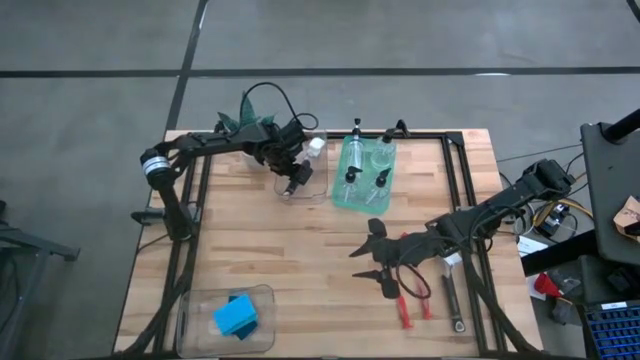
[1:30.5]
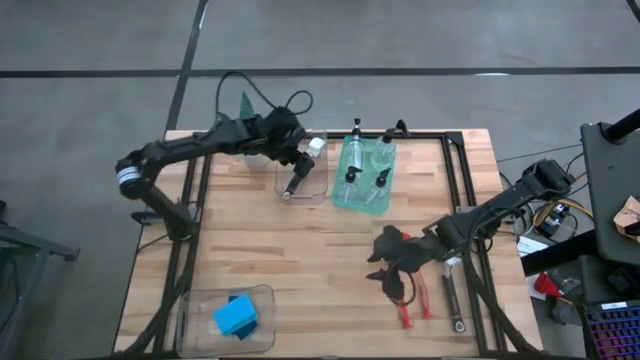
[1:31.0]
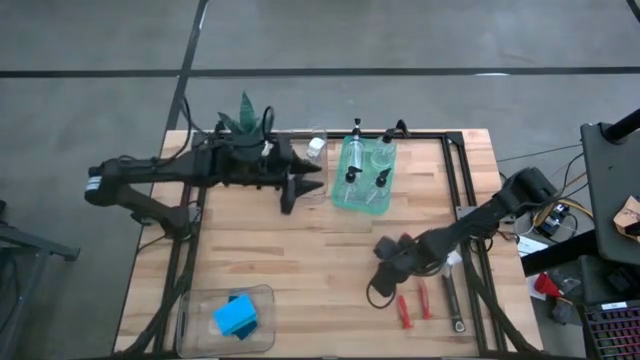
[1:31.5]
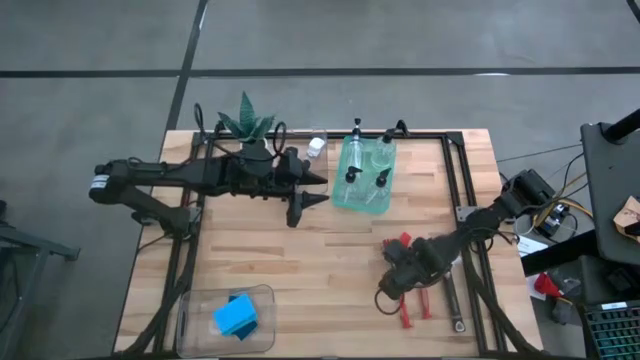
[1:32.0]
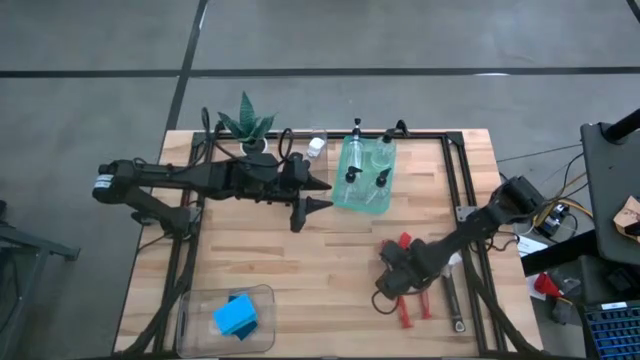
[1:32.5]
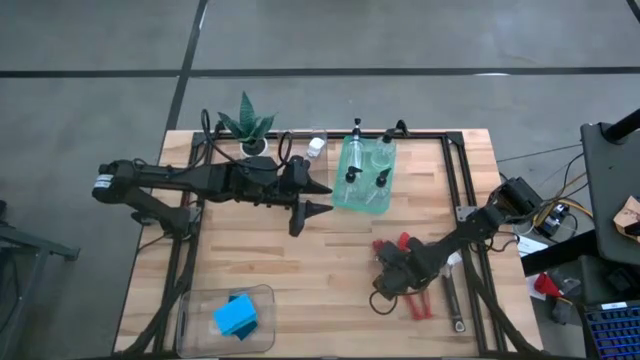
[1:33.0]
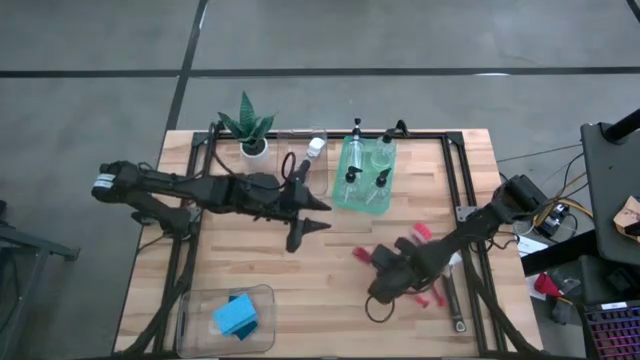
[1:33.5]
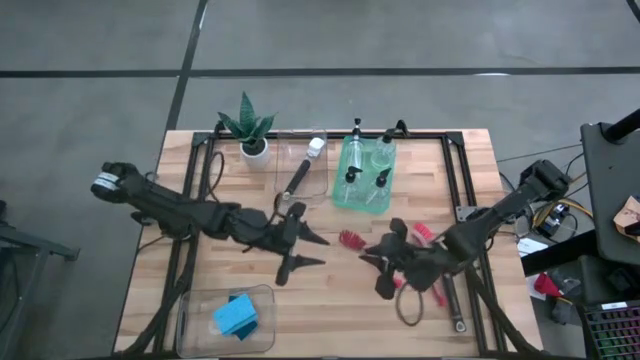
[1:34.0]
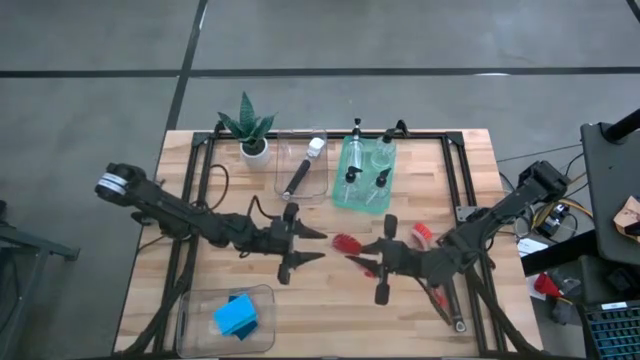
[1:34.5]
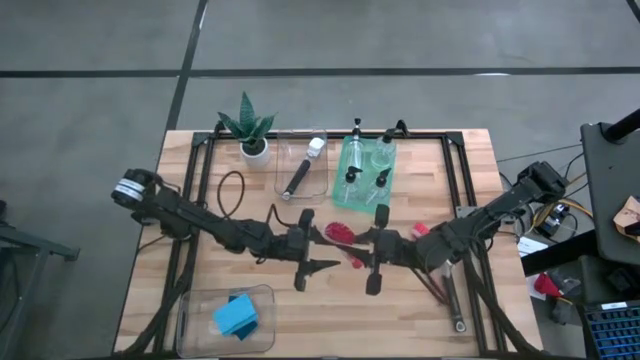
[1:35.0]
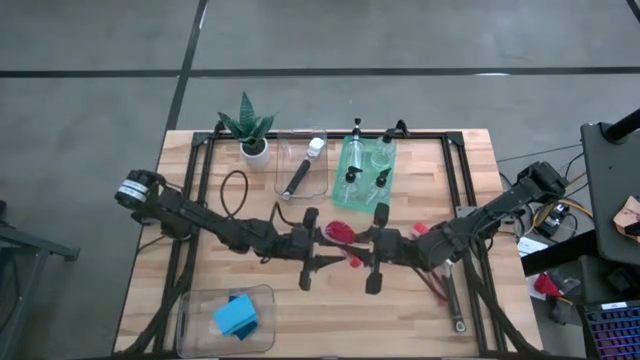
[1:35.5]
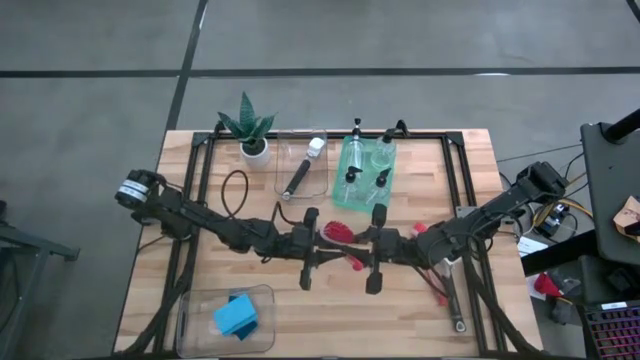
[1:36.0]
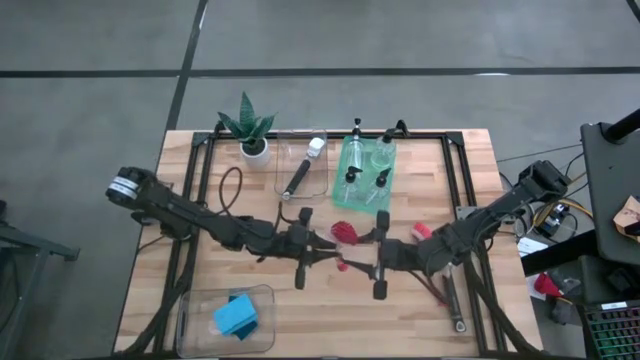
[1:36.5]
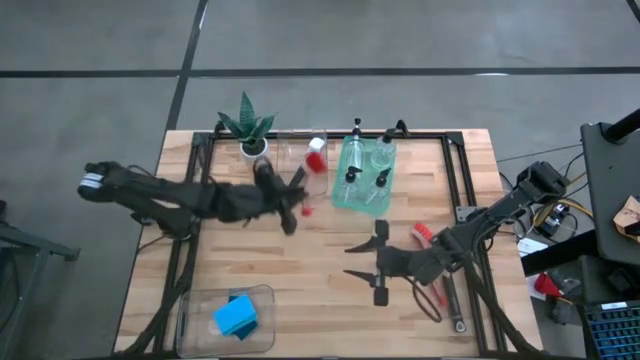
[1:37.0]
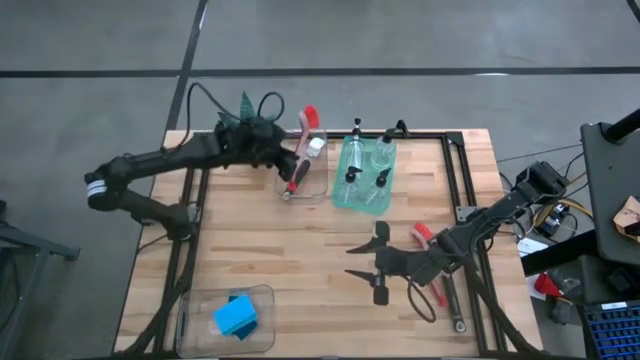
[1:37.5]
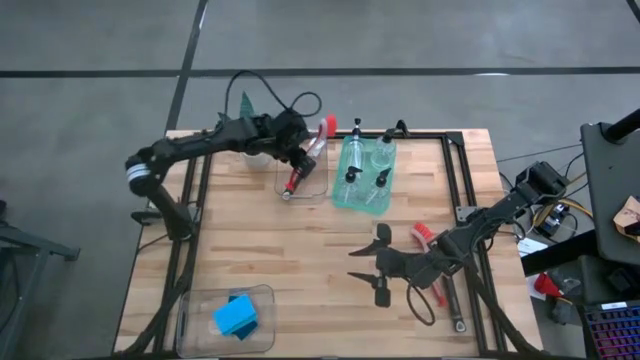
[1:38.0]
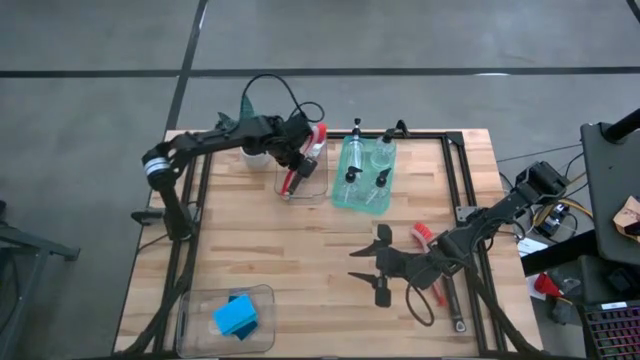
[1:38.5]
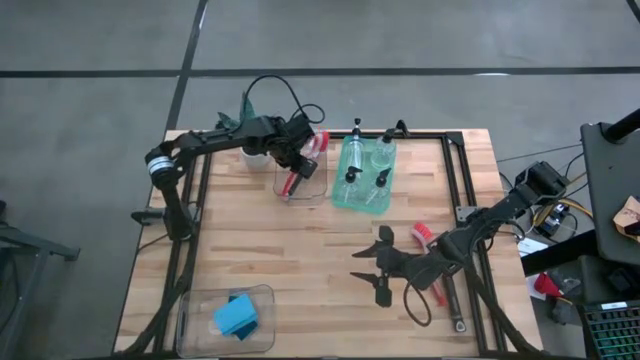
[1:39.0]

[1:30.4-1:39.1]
Task: Pick & Place Kitchen Sink Supplies
Put the red dish brush into the top transparent bin

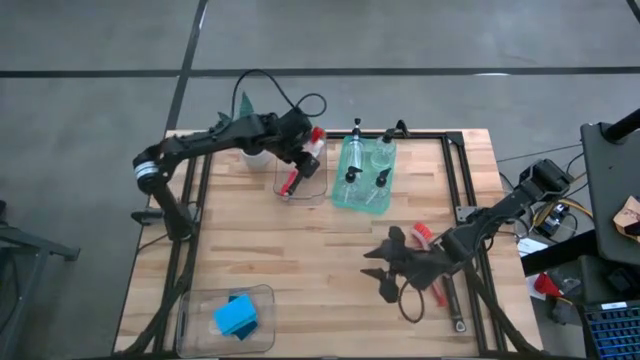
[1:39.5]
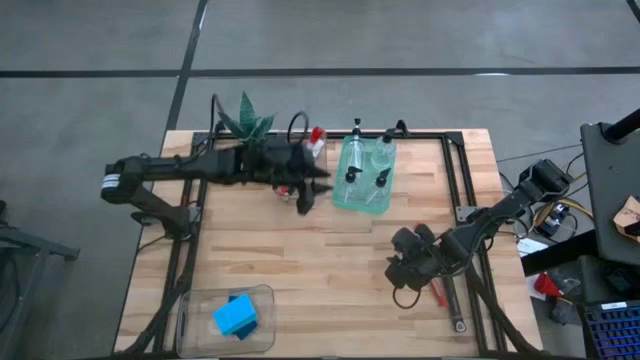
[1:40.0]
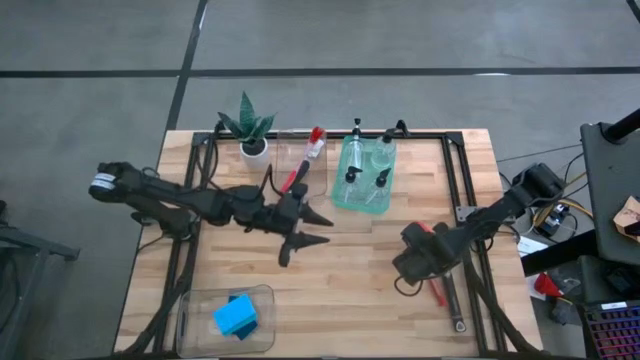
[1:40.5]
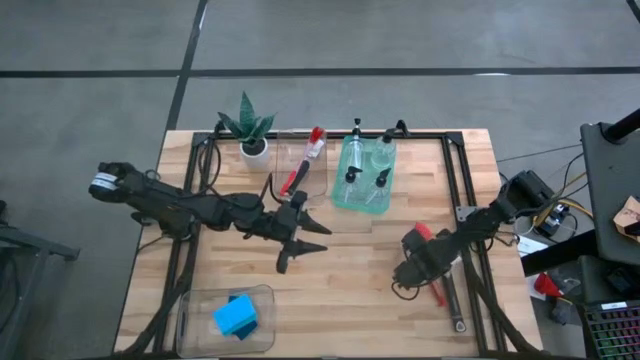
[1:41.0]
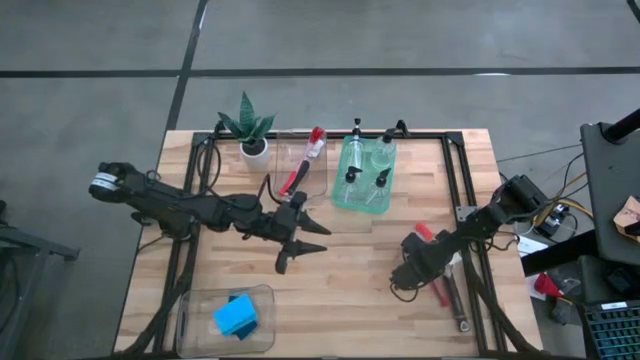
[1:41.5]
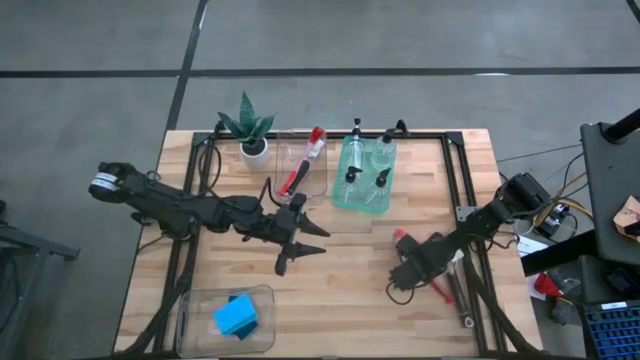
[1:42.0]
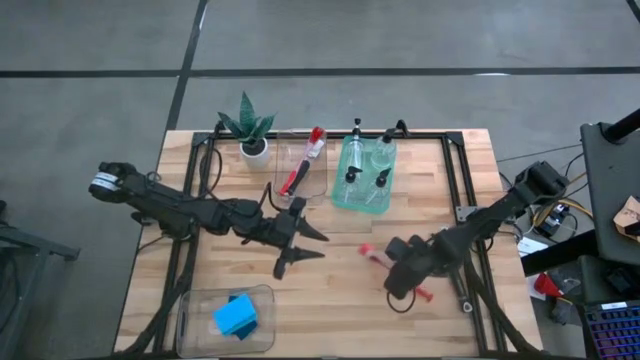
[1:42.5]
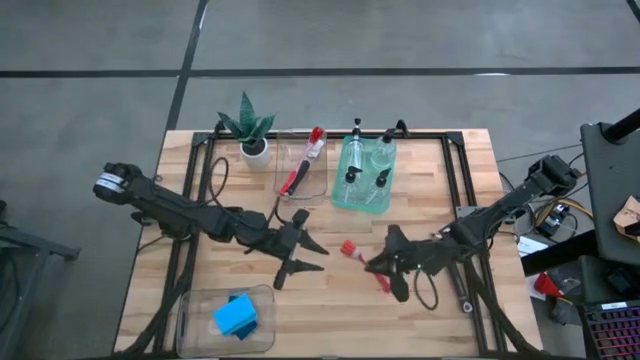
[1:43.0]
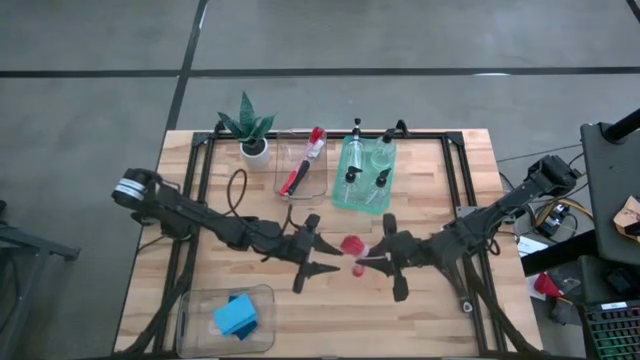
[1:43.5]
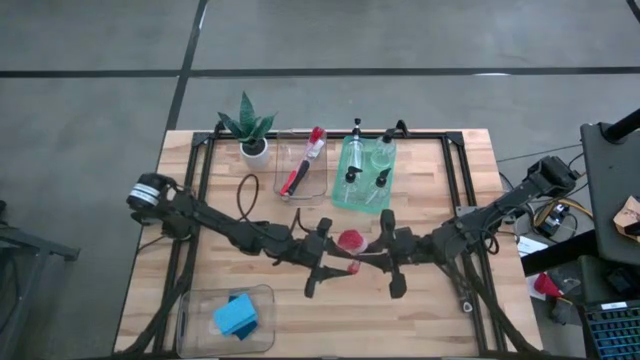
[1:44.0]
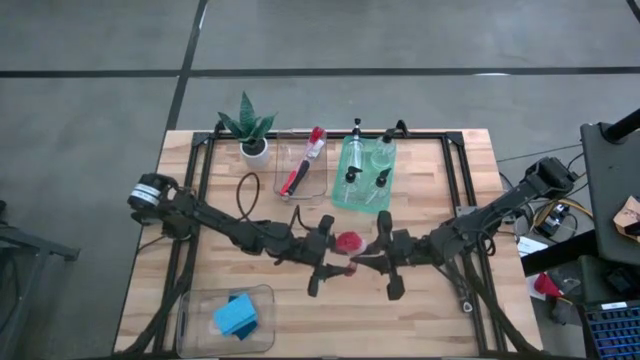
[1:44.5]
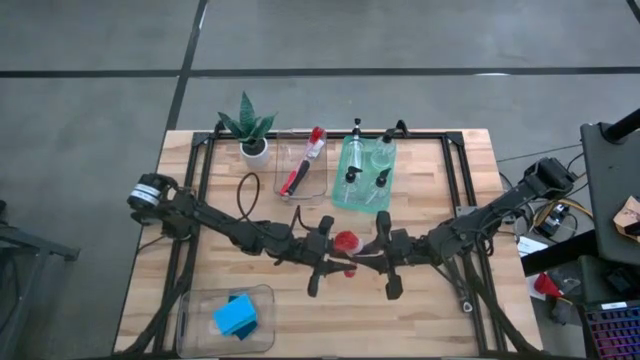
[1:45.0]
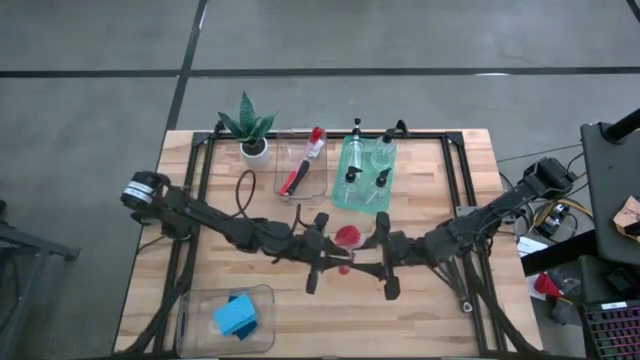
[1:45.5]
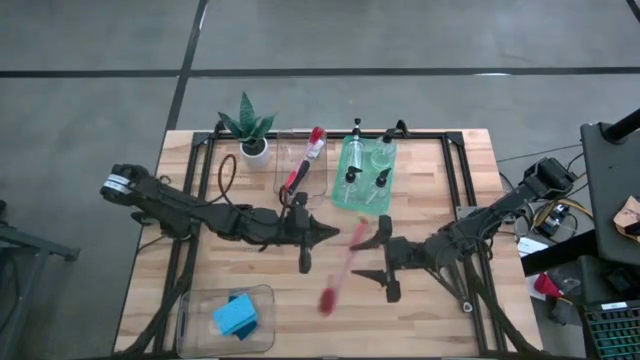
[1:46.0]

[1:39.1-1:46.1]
Put the red dish brush into the top transparent bin

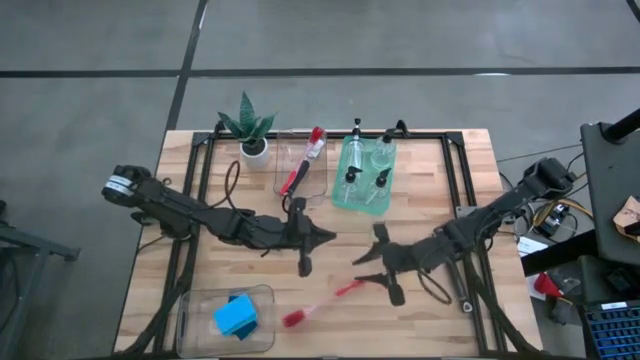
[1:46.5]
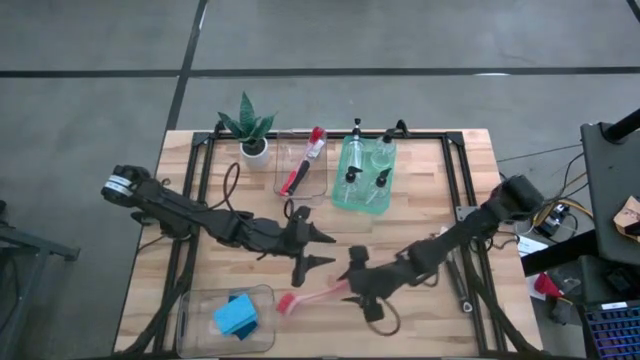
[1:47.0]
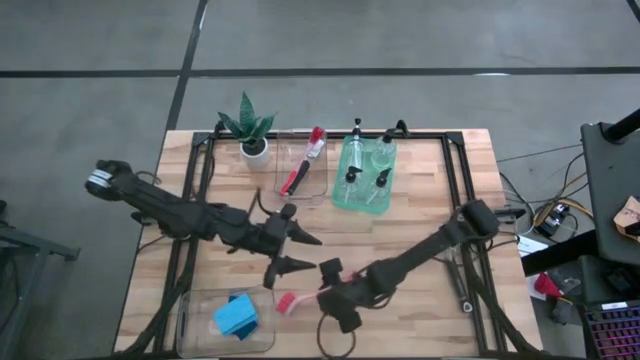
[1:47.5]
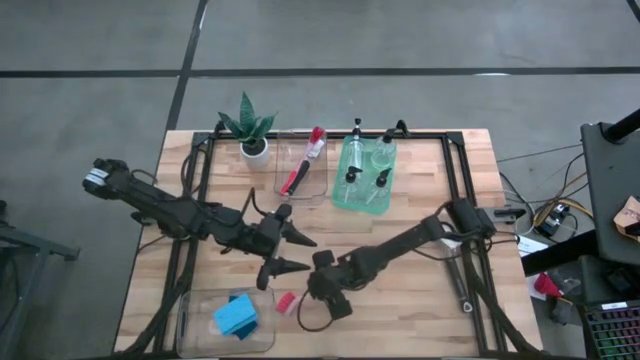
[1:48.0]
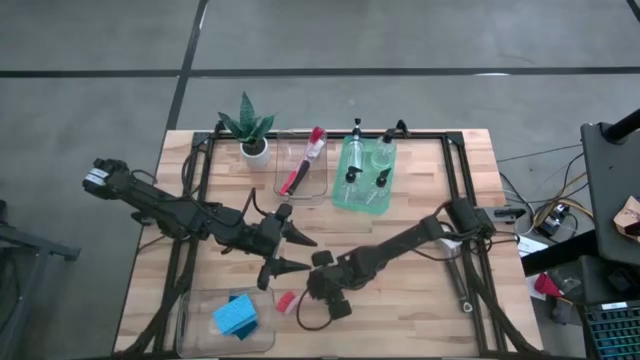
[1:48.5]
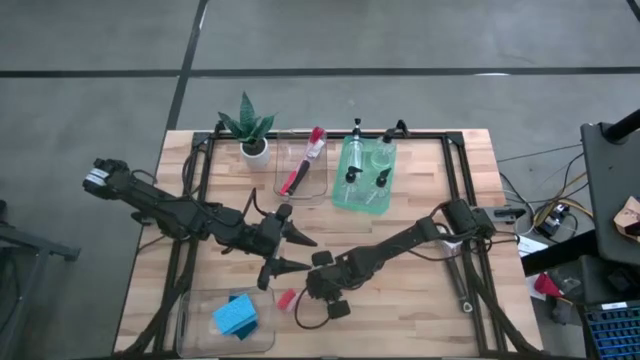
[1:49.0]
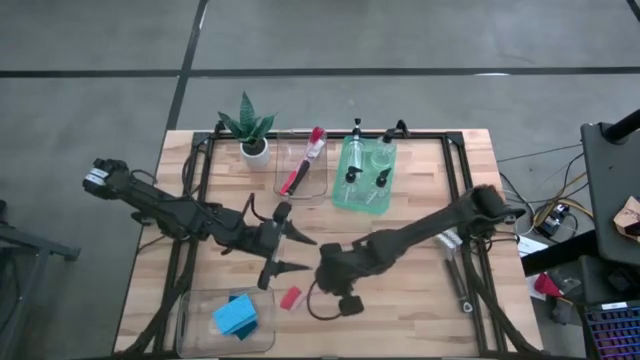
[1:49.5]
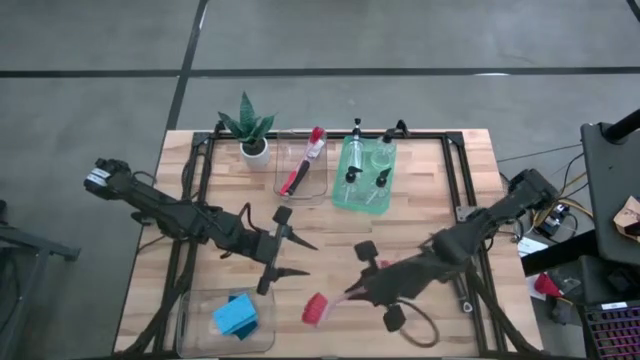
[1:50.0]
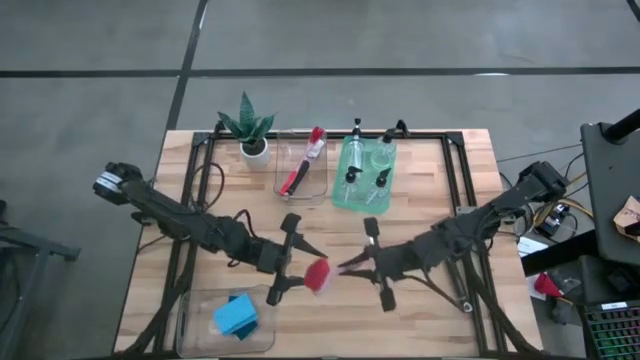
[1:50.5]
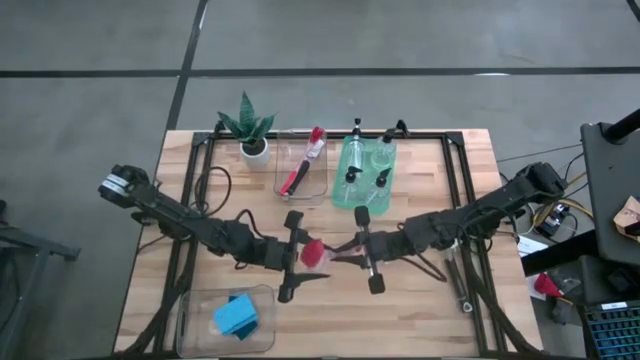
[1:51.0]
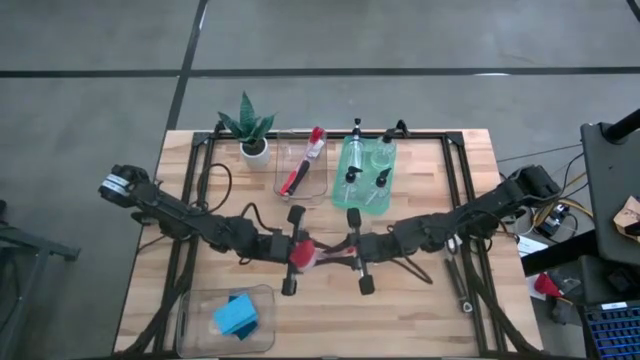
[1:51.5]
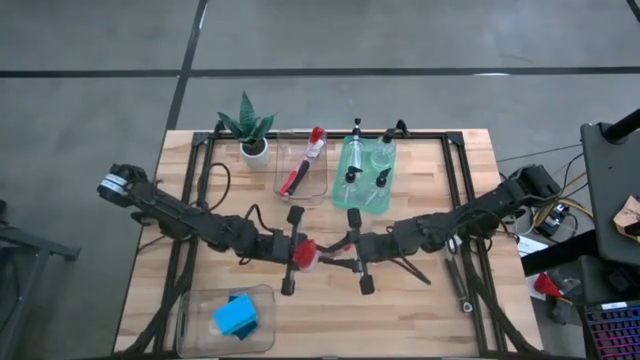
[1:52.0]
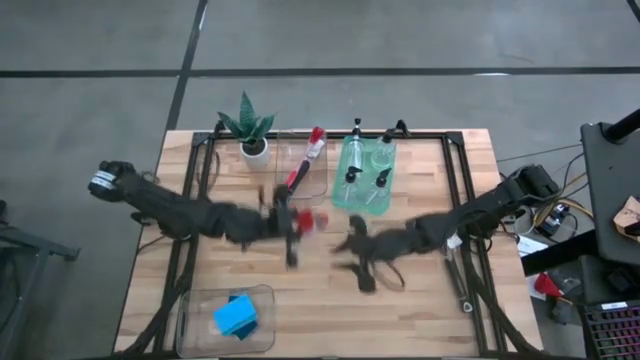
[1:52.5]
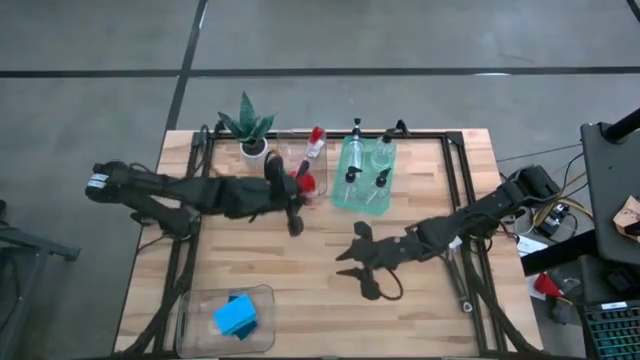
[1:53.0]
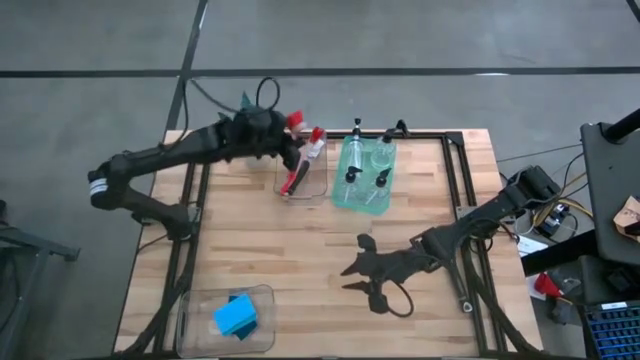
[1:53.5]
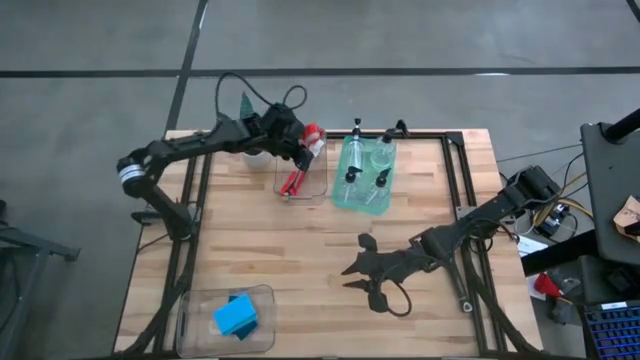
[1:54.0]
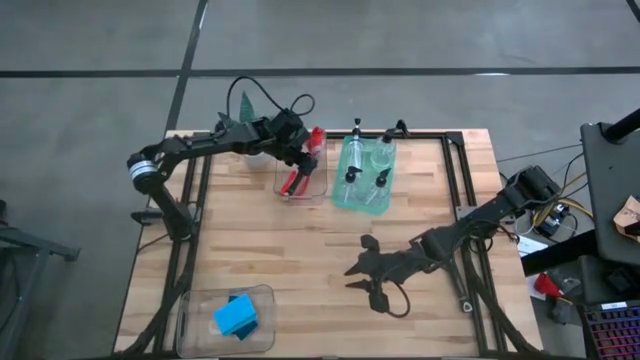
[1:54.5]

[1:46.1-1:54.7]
Put the red dish brush into the top transparent bin
